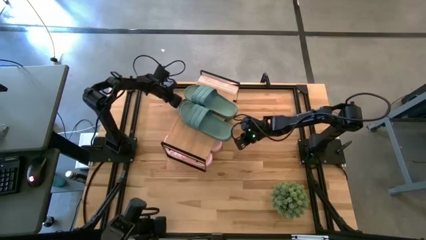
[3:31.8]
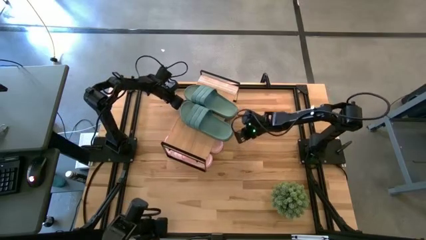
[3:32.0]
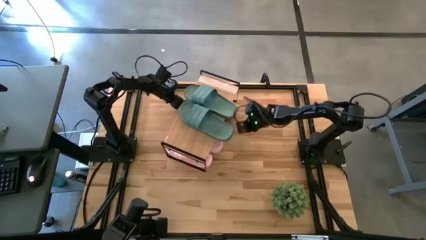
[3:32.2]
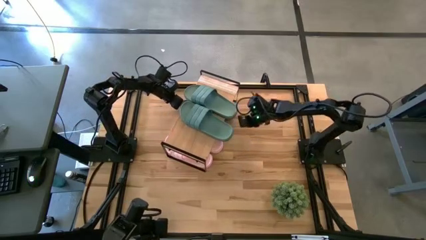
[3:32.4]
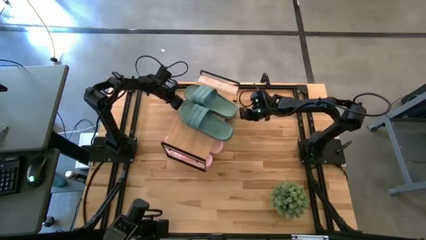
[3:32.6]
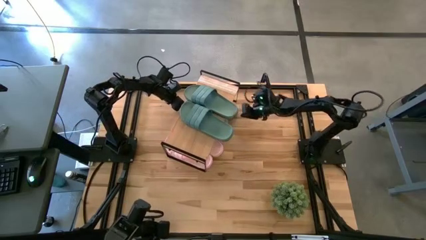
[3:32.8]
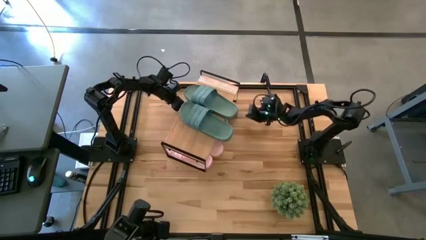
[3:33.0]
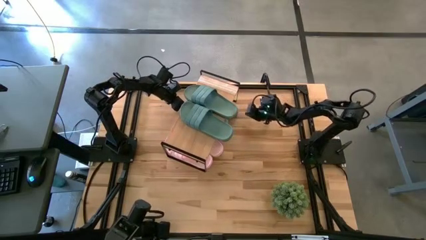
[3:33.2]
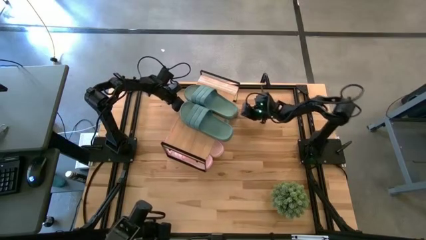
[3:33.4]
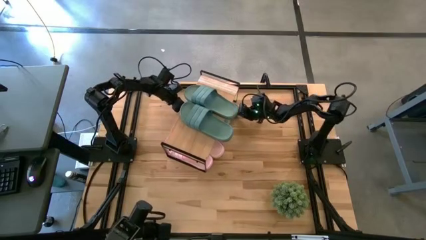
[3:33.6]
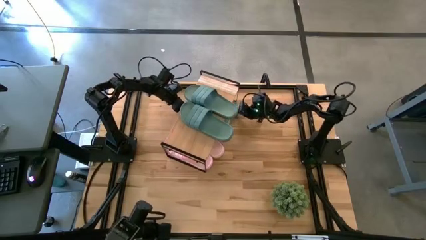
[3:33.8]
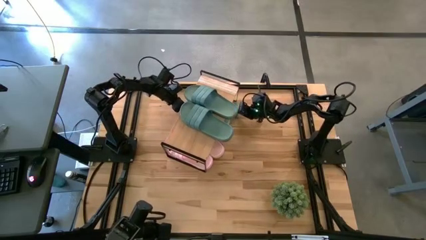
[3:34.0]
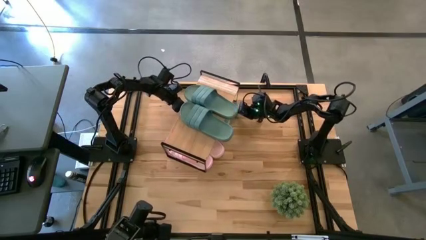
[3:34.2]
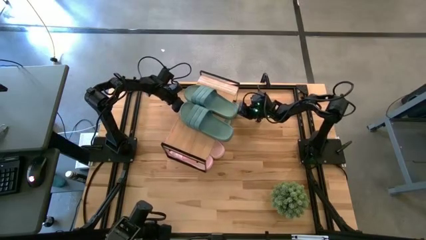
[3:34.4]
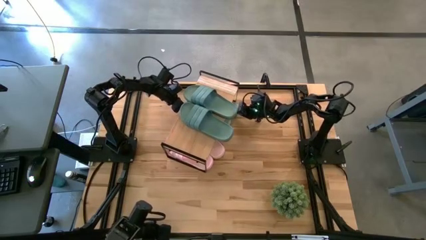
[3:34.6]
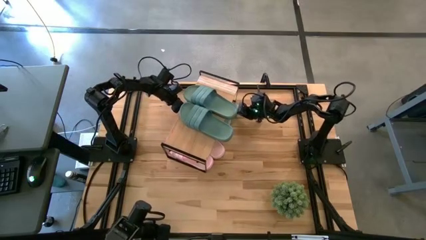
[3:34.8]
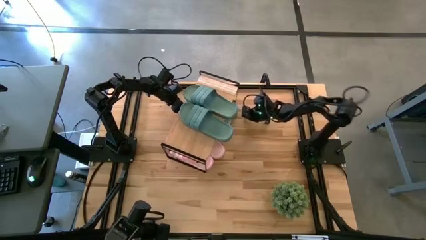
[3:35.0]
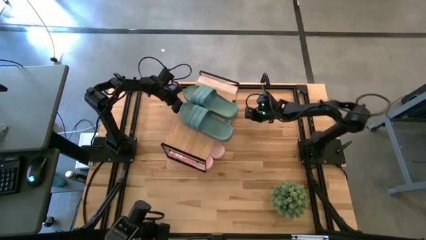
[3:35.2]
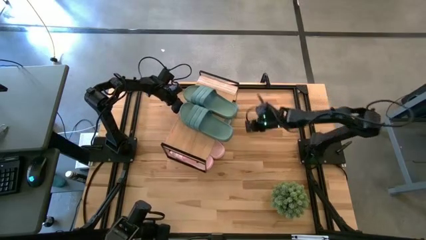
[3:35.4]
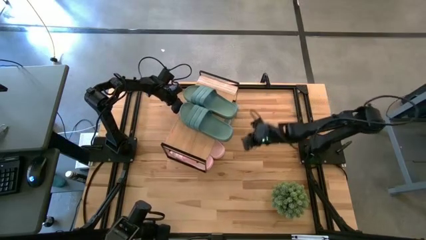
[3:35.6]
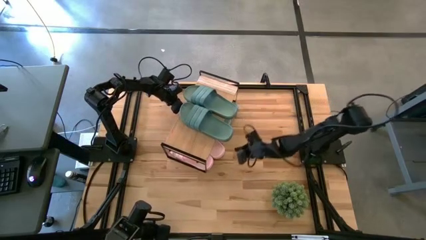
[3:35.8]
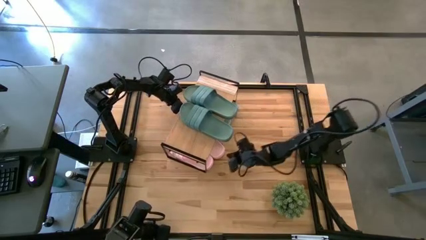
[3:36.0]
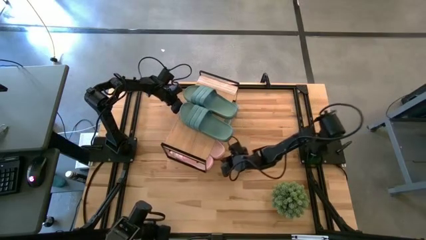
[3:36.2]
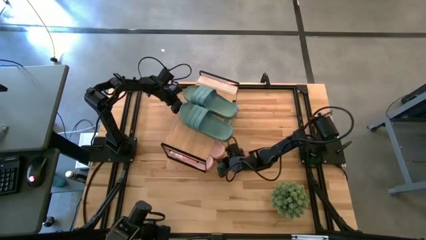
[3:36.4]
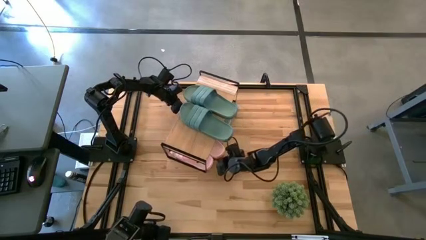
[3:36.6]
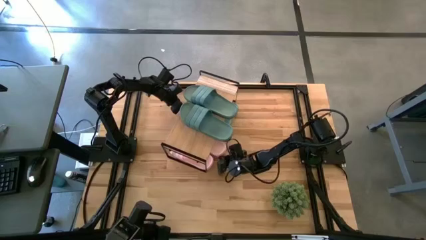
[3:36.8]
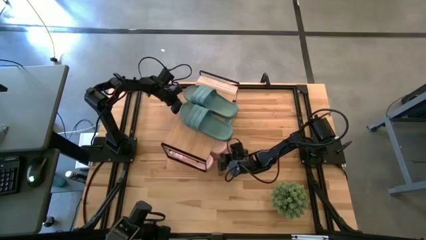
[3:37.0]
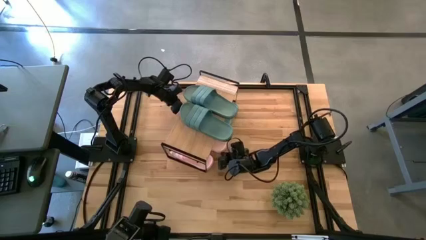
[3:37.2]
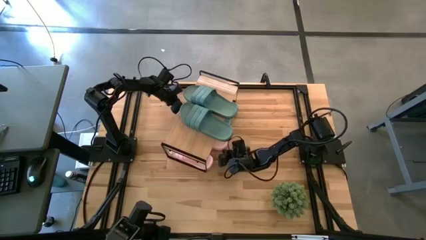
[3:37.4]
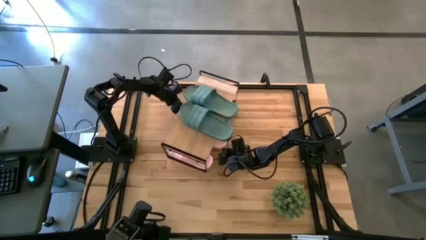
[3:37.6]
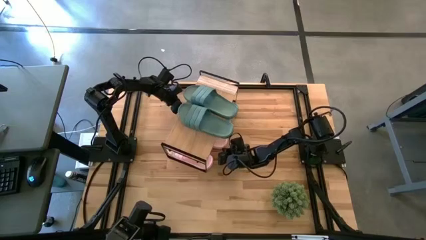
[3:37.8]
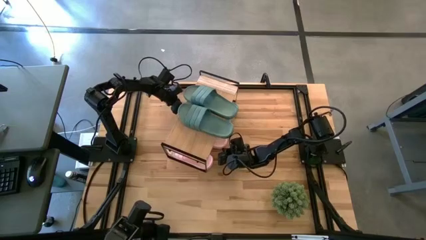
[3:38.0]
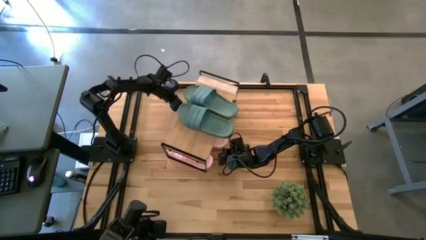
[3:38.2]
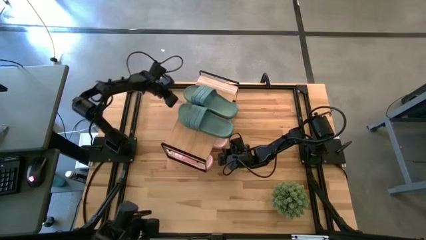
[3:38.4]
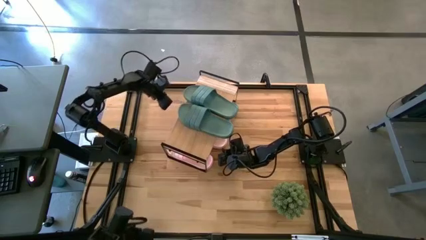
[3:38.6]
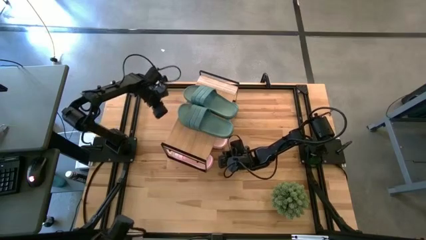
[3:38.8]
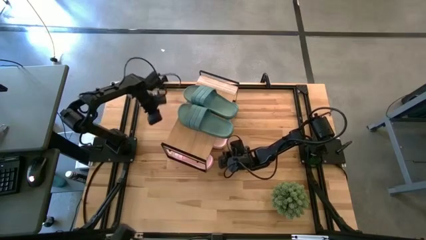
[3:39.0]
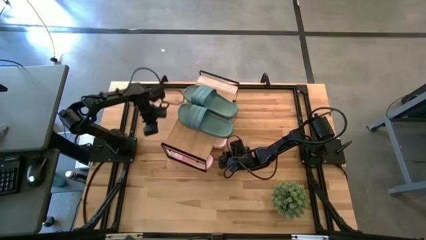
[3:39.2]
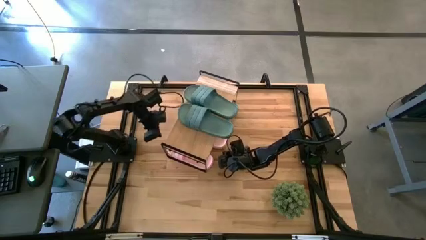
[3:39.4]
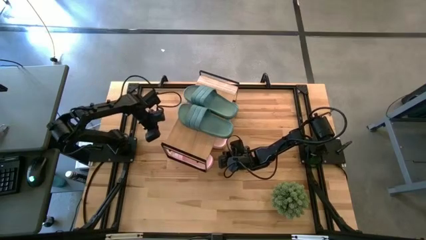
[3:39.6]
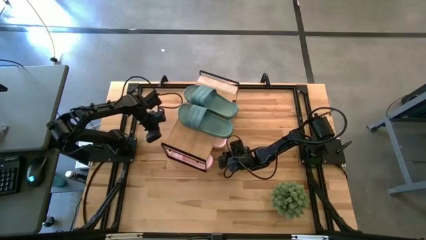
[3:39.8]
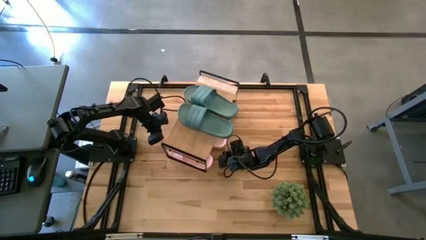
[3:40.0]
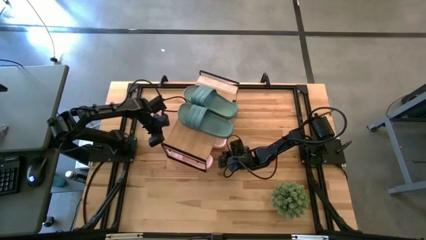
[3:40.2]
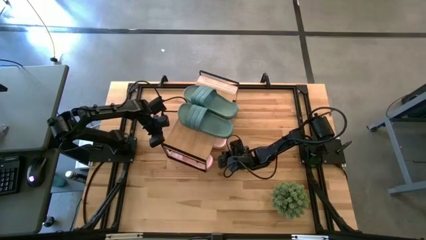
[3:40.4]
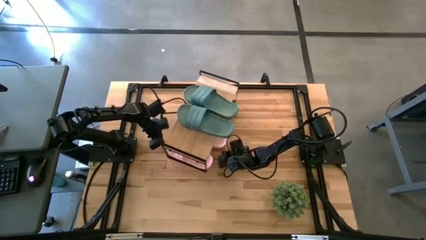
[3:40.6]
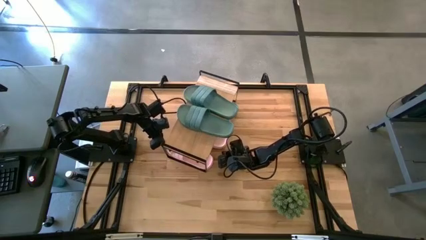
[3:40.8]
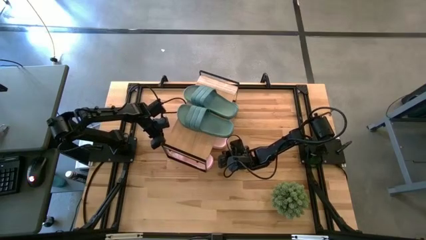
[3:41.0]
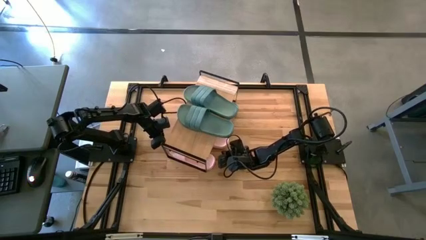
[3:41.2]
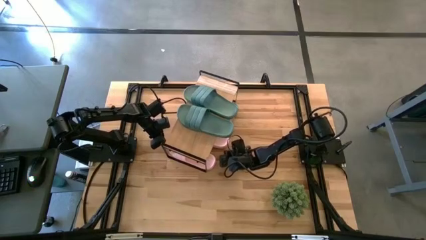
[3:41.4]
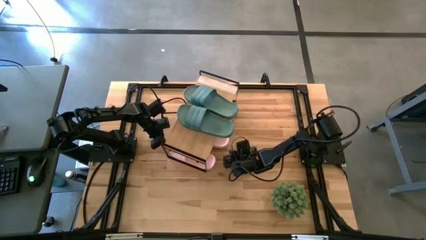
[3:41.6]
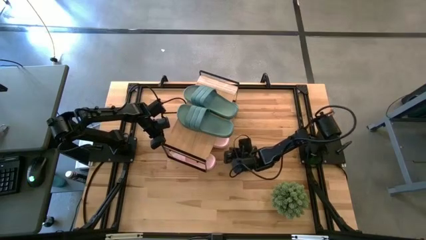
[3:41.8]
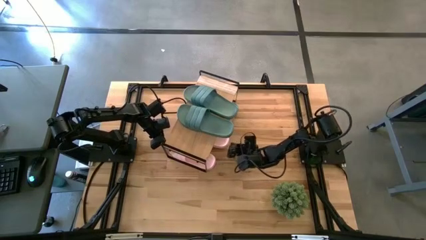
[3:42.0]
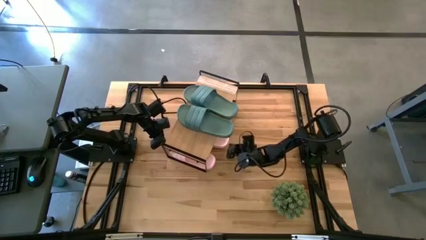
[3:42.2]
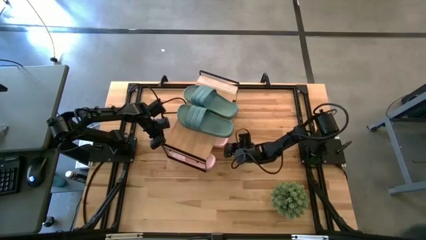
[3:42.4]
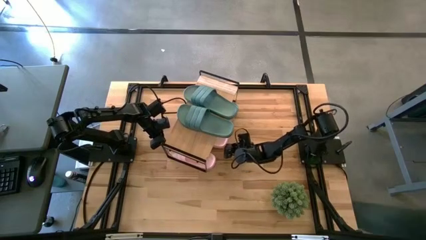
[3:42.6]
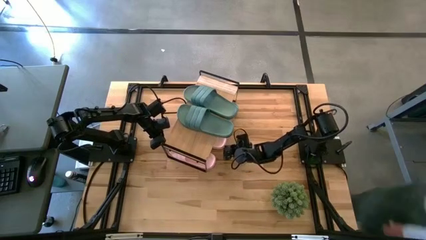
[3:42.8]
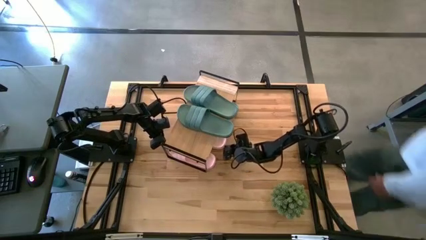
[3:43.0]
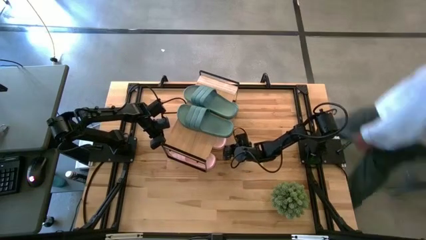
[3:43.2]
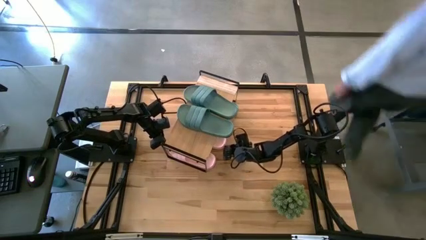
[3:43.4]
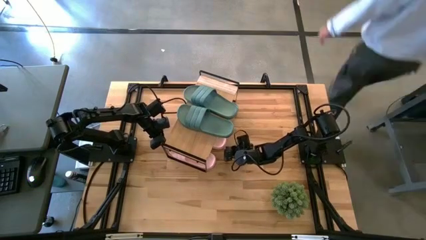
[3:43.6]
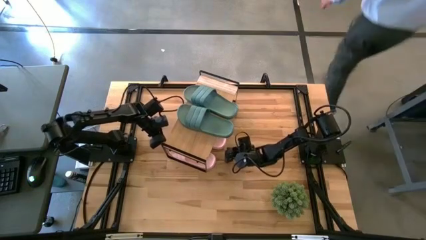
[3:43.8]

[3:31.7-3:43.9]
Task: Pick and place slides into the shelf
Adjust the slides under the shelf

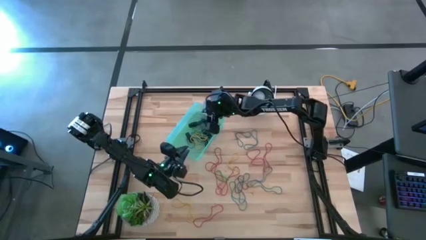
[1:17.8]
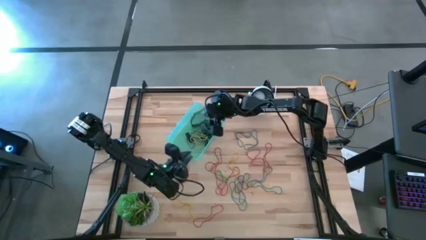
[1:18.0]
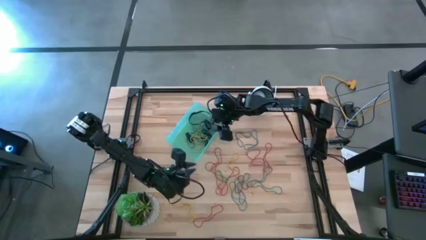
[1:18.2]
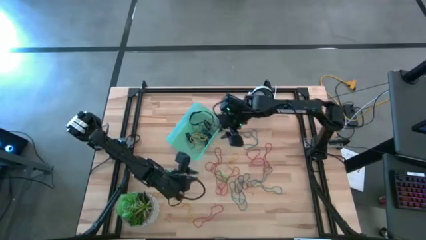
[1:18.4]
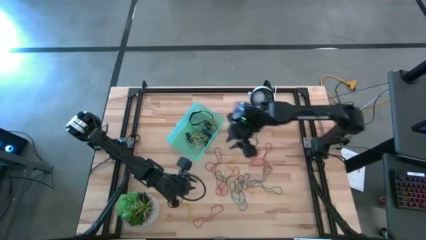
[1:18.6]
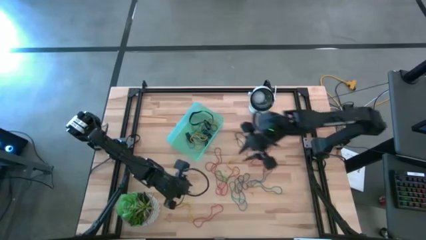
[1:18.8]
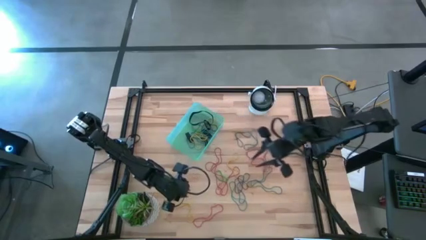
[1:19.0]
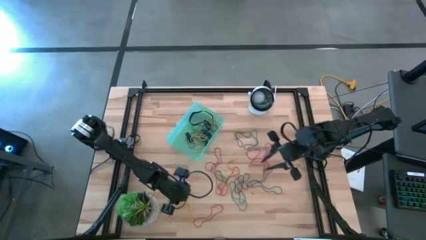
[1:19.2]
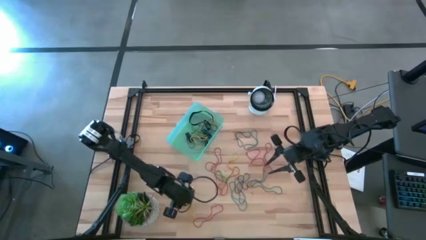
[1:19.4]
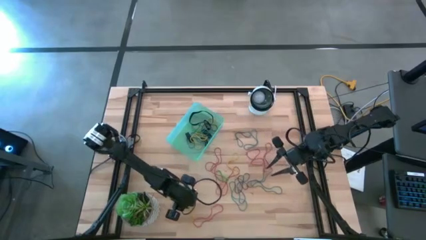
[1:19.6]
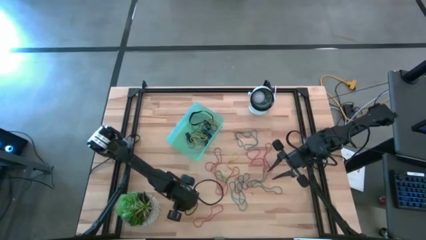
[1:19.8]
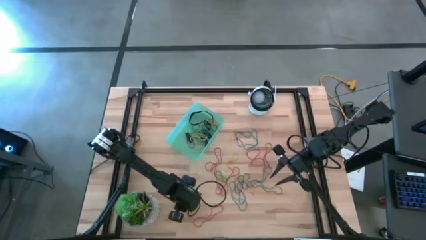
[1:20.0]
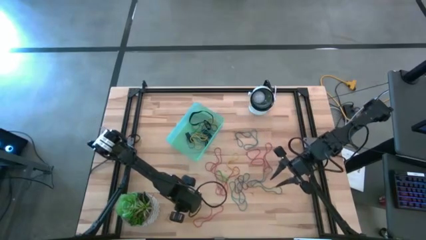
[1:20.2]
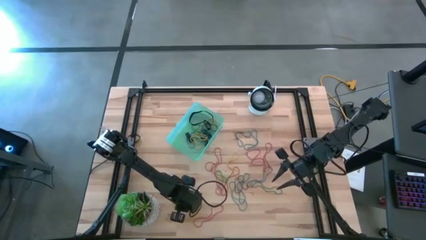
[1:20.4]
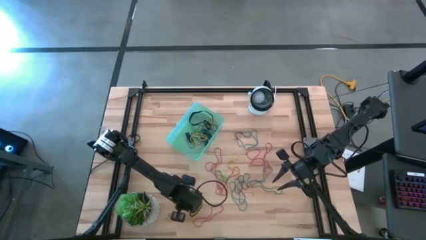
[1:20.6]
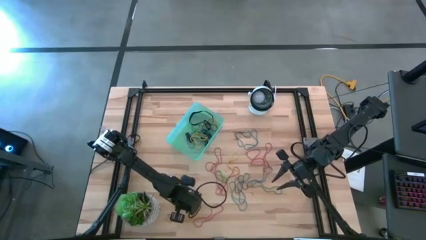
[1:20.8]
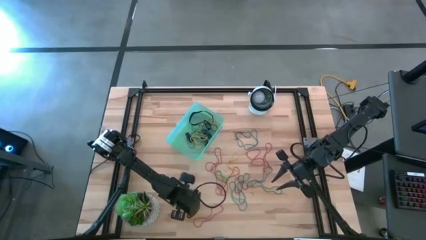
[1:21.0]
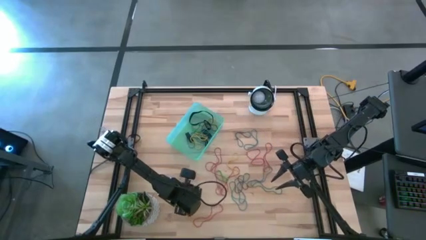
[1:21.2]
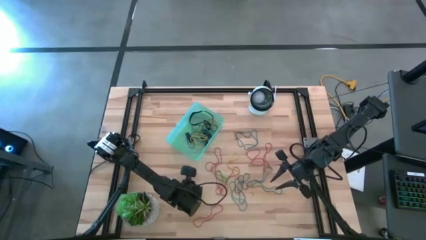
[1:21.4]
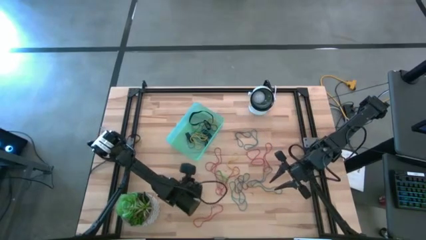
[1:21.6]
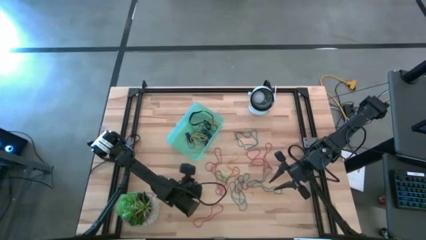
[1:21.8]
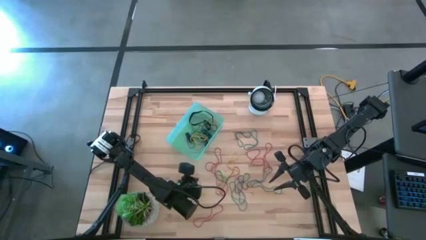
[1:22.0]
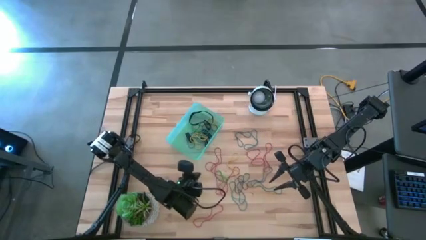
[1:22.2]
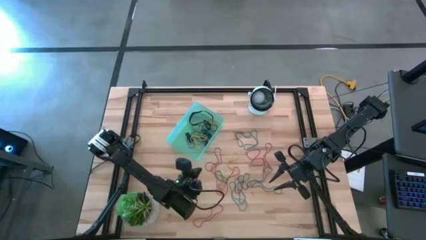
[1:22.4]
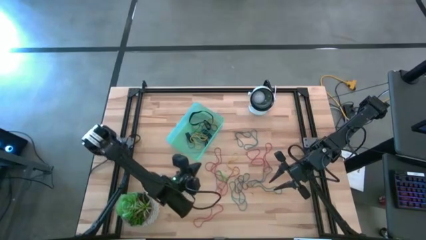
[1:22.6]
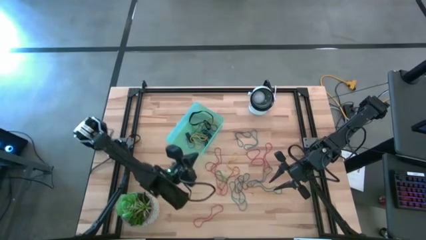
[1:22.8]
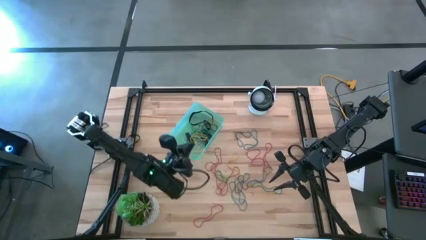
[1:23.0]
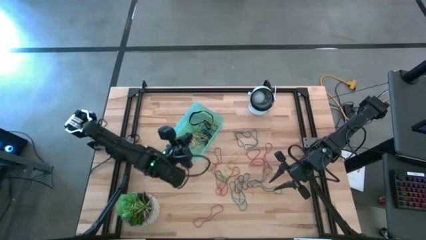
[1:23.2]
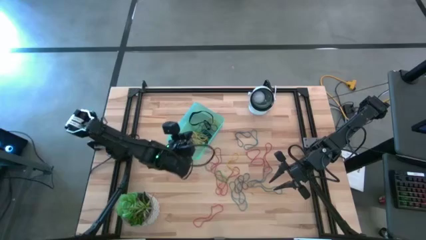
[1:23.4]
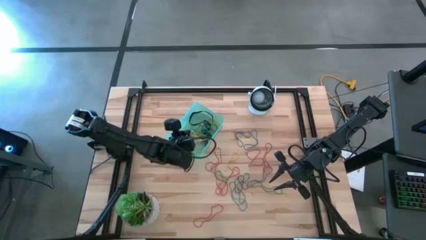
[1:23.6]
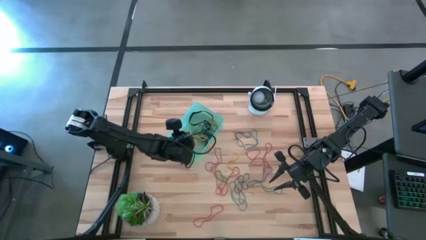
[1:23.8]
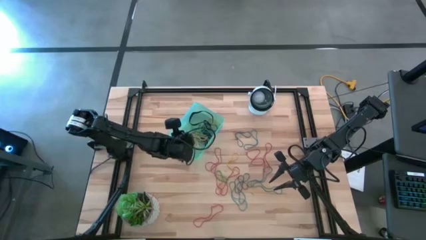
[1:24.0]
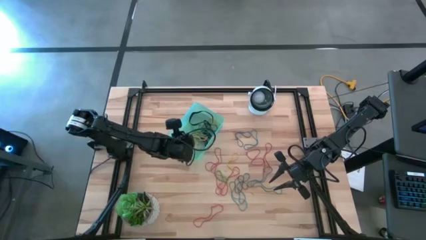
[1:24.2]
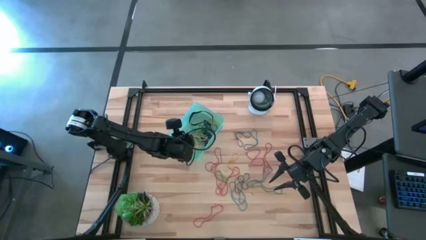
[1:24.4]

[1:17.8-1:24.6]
Task: Pick and place rubber bands into bin
Put the yellow rubber band into the green bin
